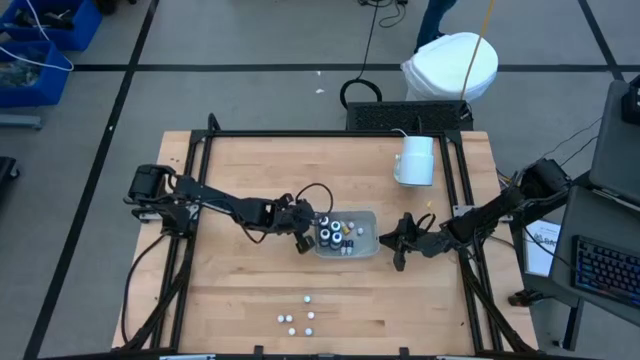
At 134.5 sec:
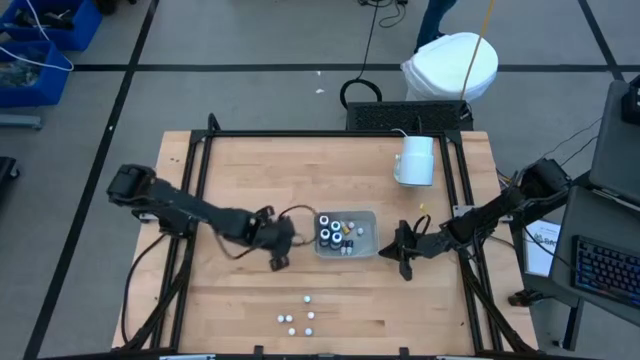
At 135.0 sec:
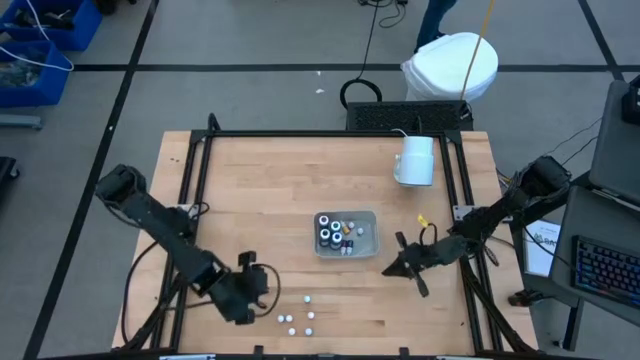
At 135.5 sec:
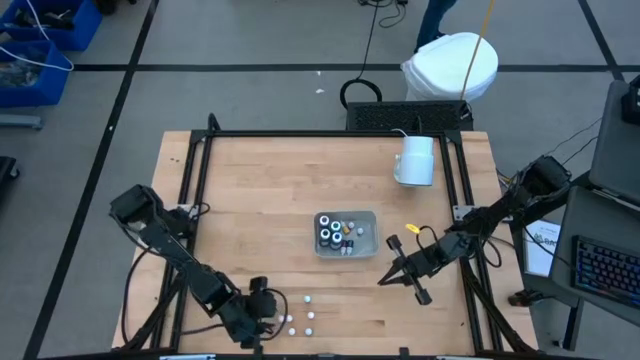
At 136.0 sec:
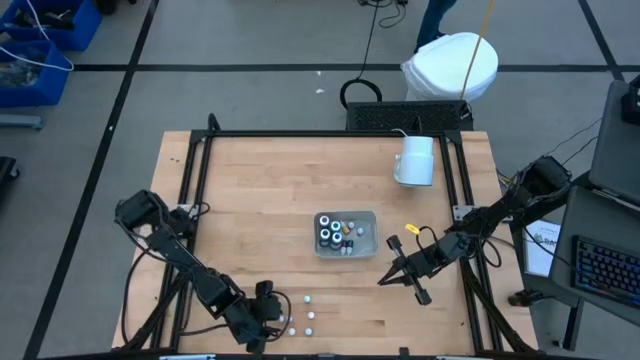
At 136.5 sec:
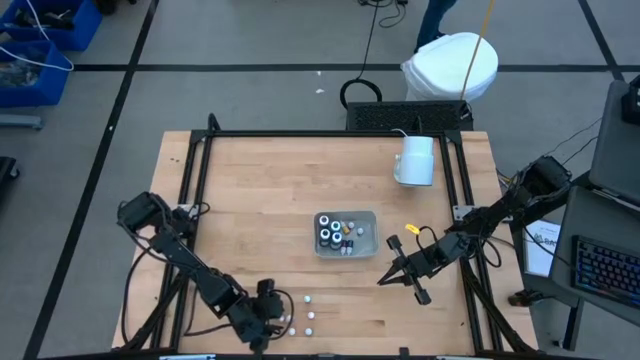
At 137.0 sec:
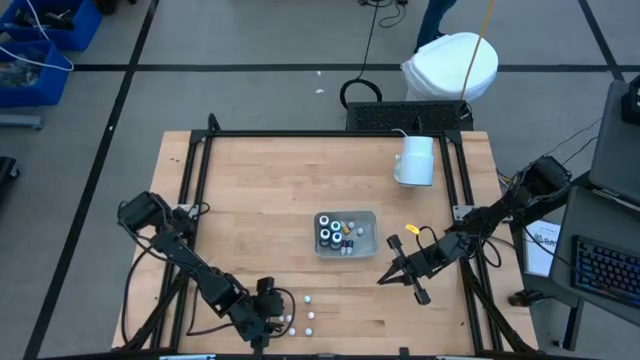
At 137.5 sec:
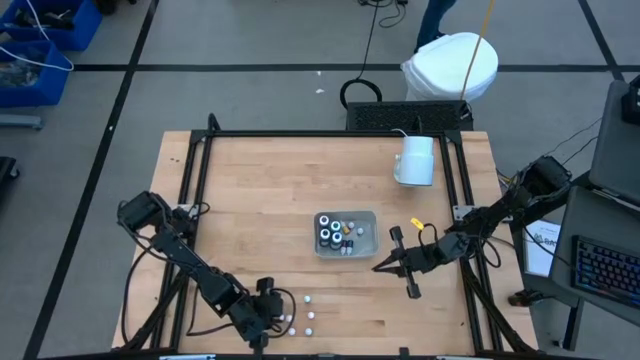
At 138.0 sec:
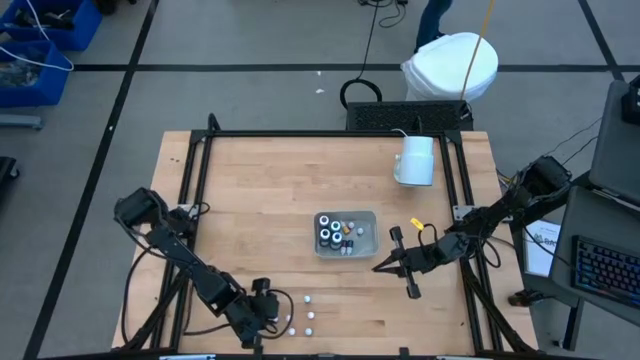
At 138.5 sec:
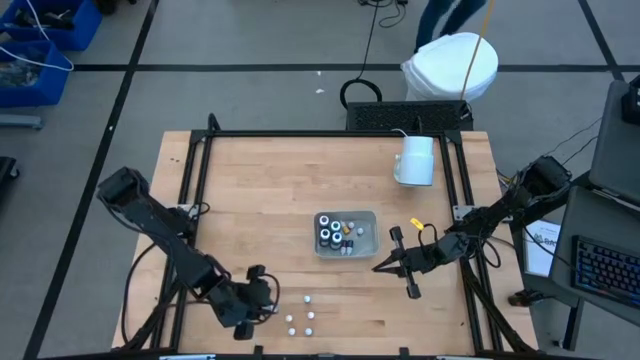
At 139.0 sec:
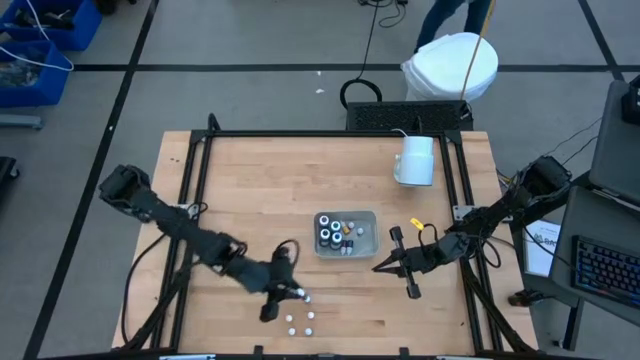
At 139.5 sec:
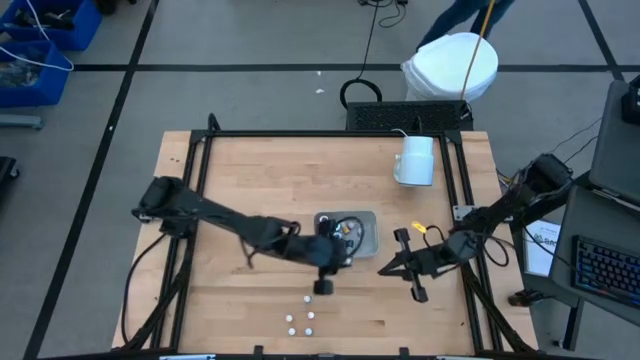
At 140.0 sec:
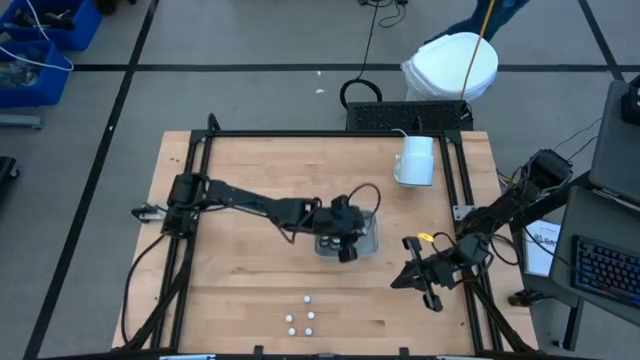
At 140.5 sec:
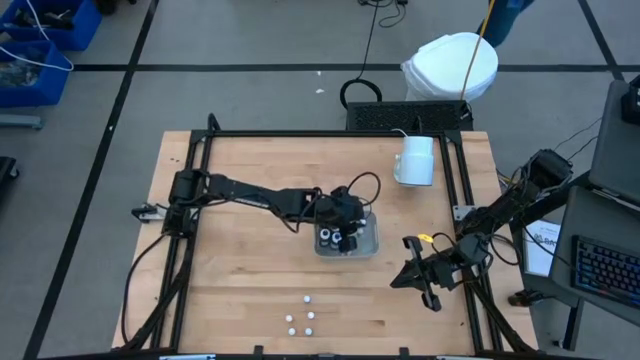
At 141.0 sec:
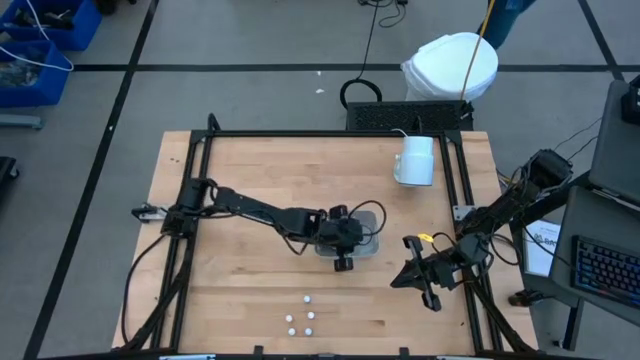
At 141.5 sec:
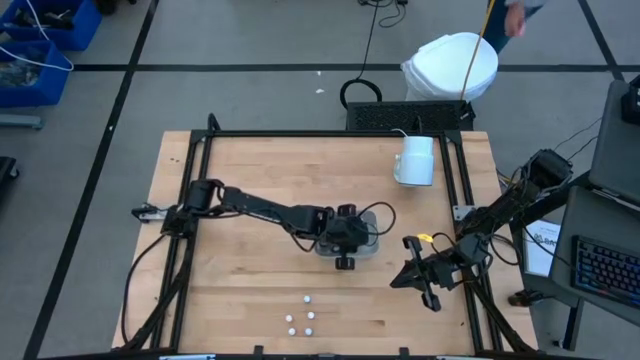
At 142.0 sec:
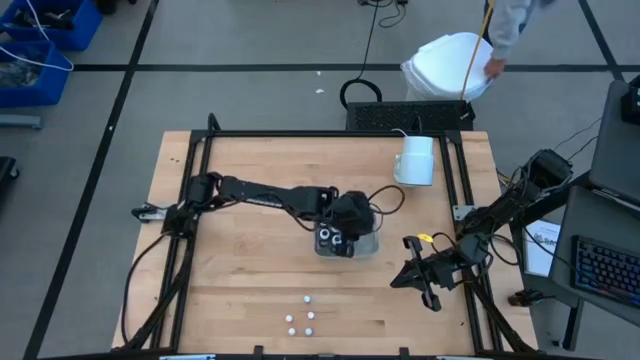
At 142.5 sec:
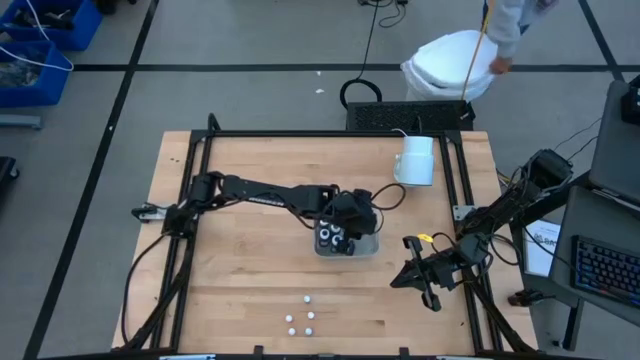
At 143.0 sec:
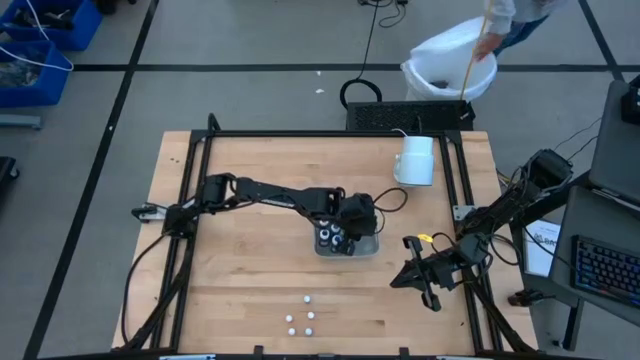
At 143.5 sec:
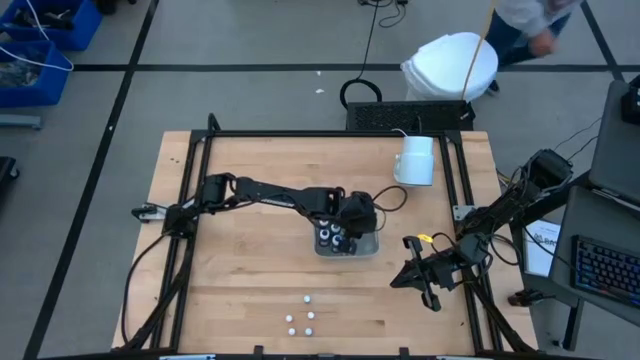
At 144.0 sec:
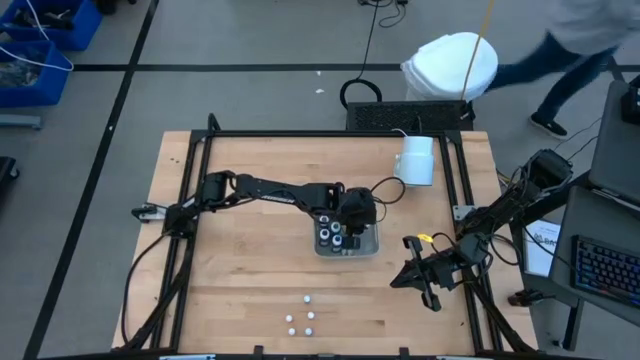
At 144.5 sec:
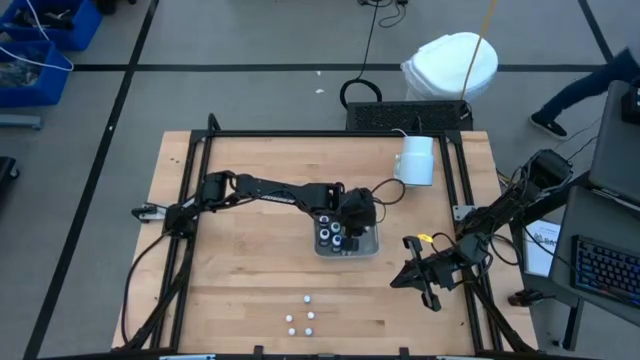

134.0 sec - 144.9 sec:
Task: Pick & Place food coloring
Put the small violet food coloring into the gray bin

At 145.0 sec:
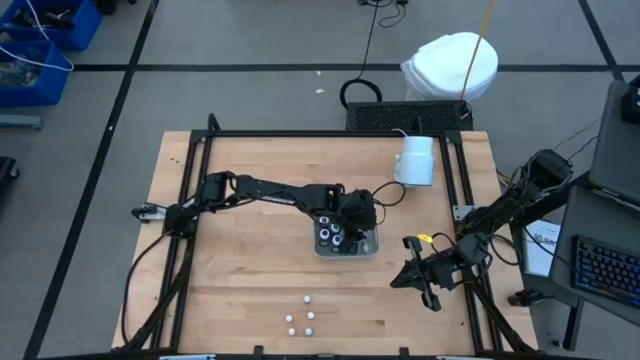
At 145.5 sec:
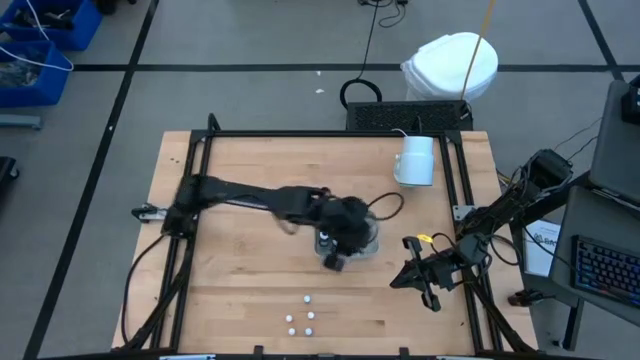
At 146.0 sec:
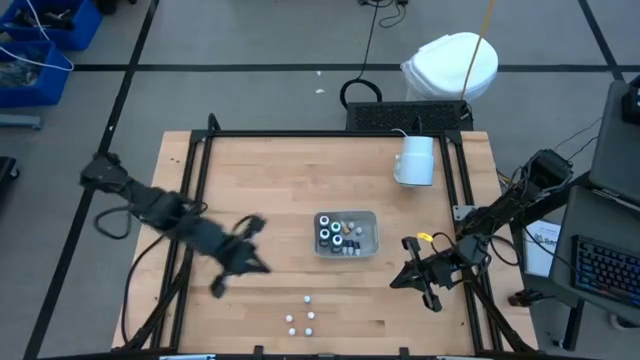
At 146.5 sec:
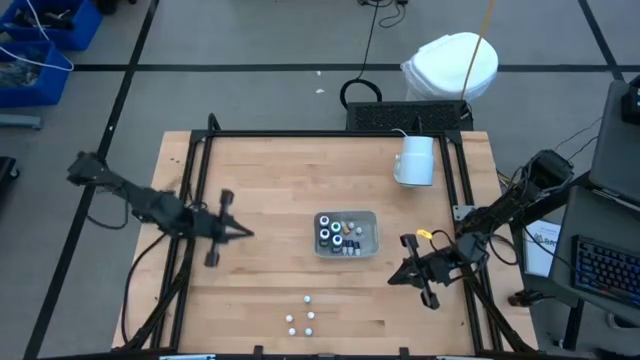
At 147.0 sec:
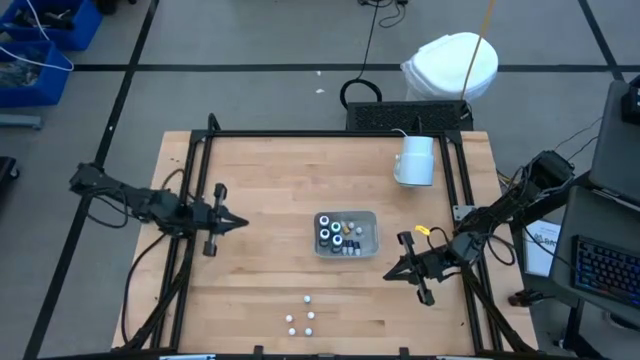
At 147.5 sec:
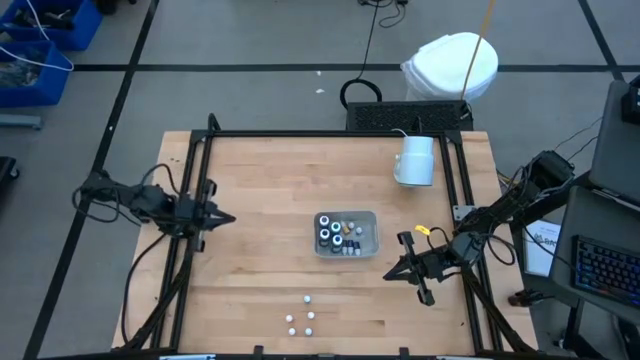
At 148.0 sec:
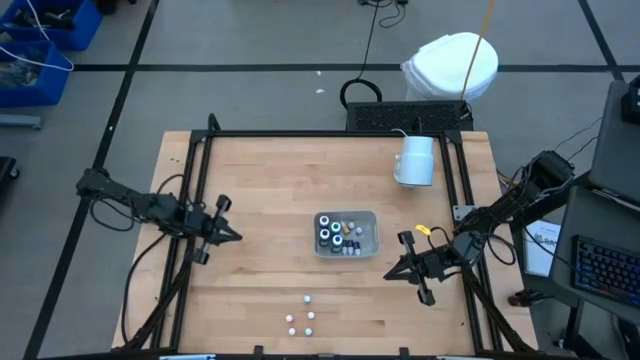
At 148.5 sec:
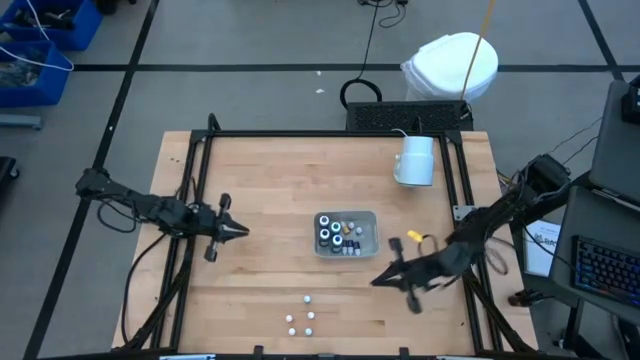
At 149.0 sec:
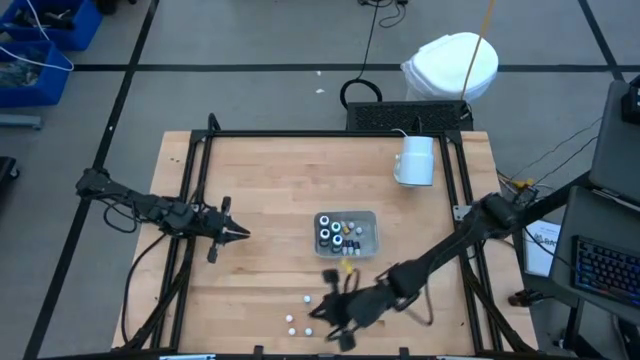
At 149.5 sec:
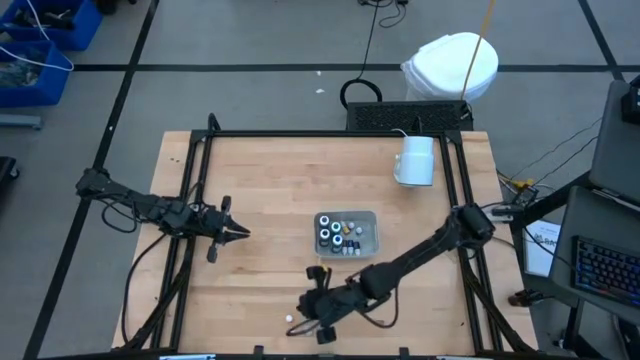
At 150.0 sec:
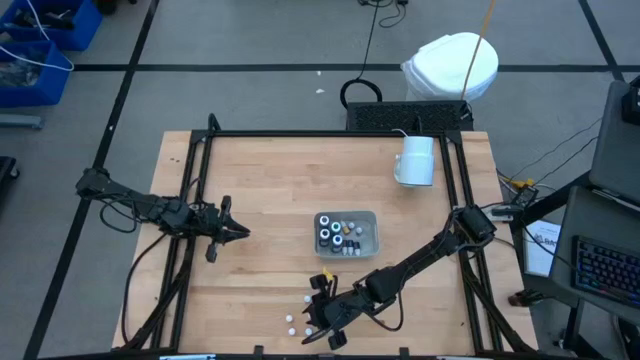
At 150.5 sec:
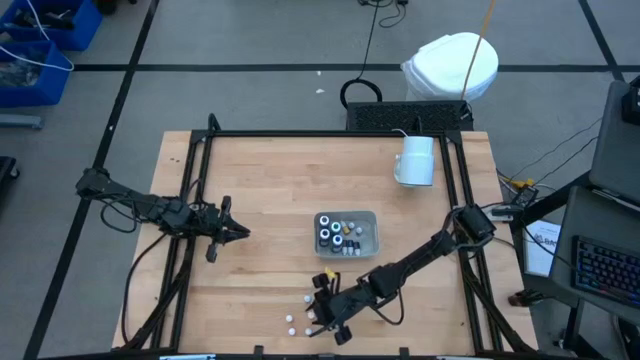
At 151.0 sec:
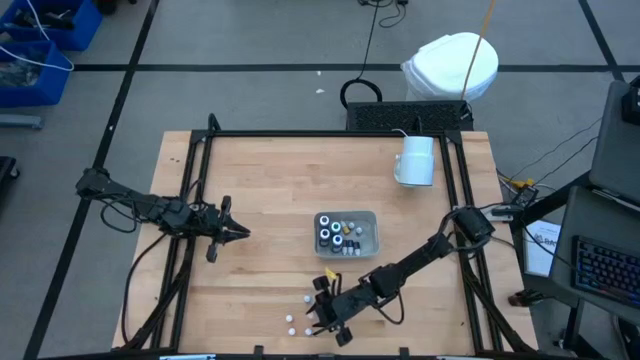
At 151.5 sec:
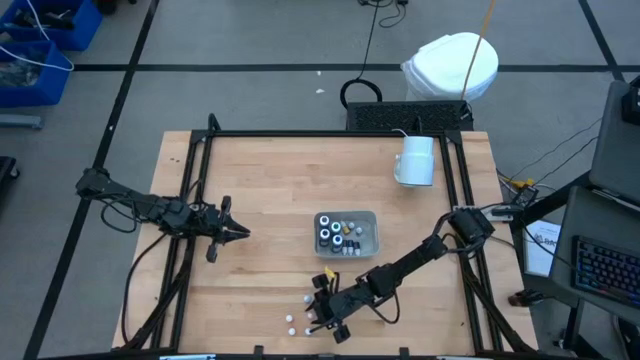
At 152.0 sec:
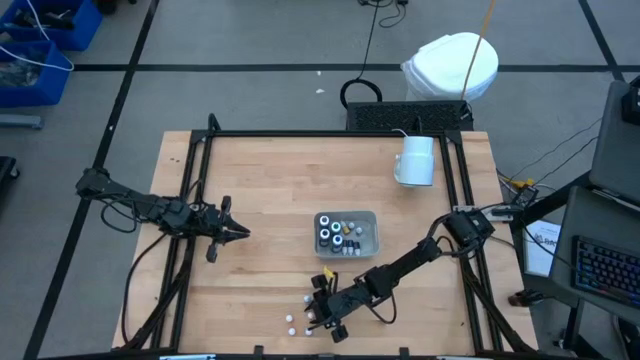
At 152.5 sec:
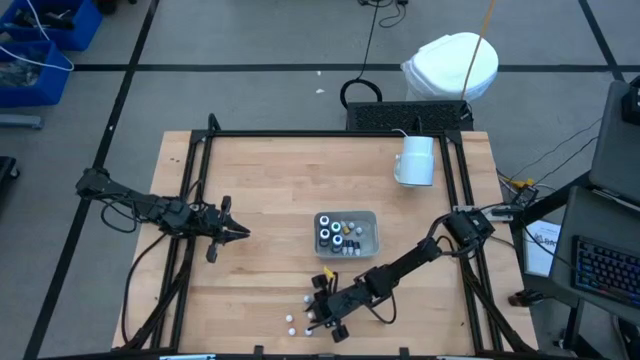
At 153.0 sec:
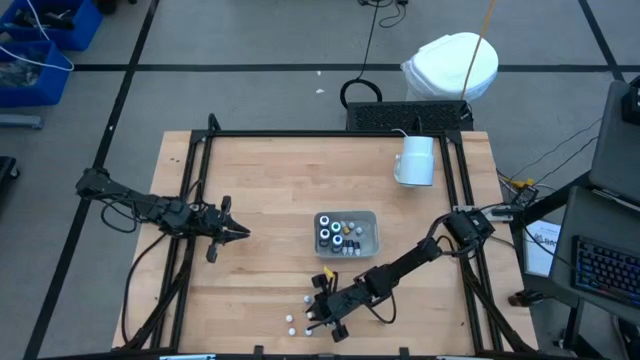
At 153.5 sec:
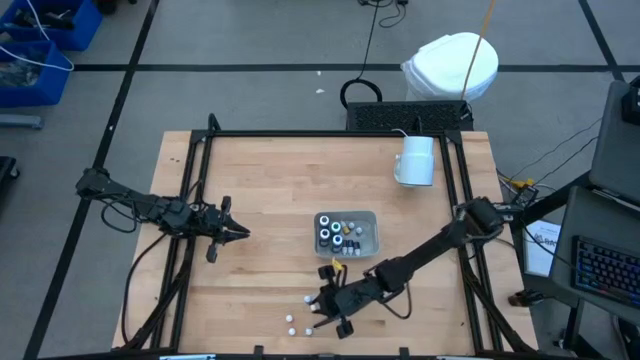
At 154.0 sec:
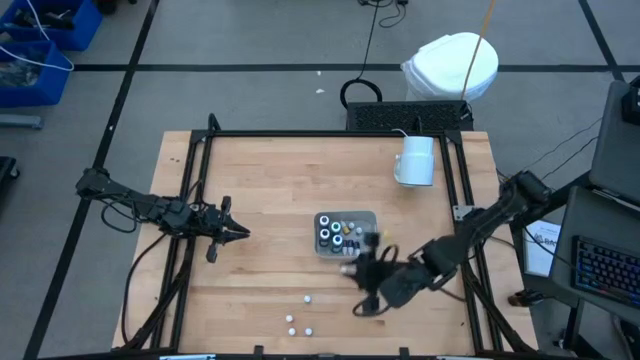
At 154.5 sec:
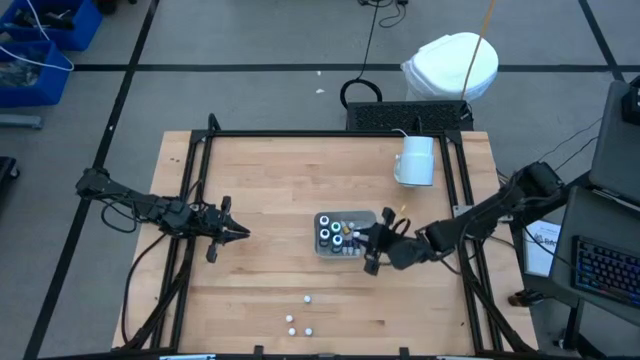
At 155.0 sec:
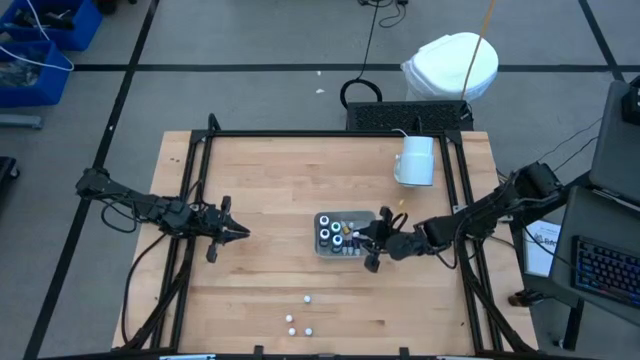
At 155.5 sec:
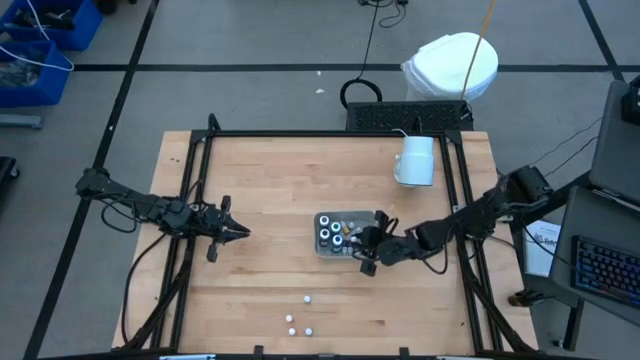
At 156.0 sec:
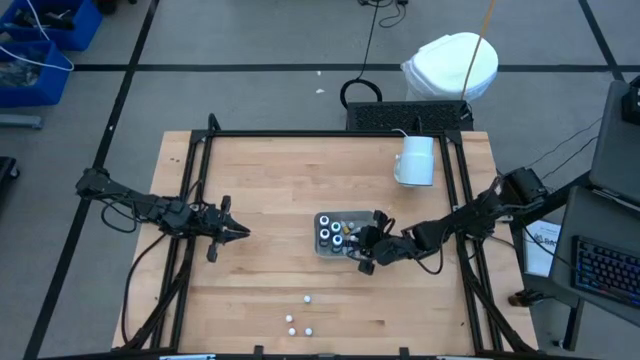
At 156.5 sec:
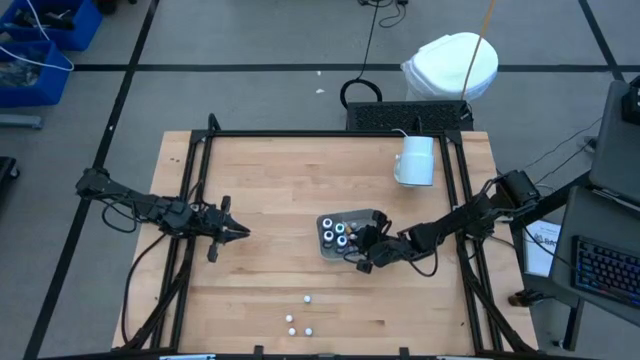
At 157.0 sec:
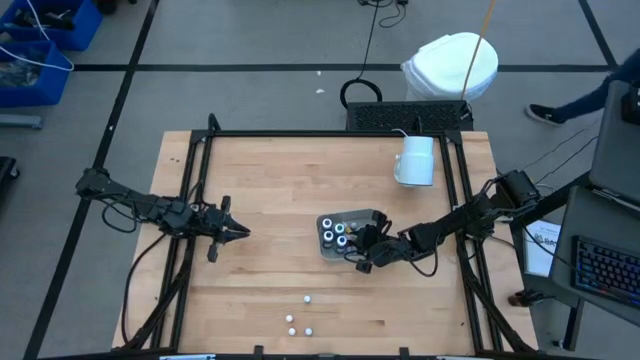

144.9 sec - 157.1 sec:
Put the small orange food coloring into the gray bin
